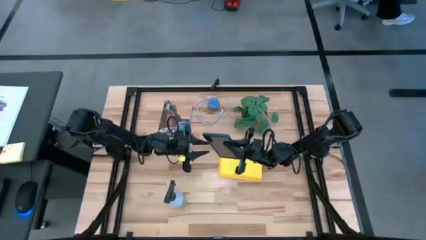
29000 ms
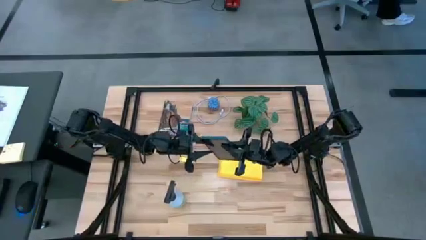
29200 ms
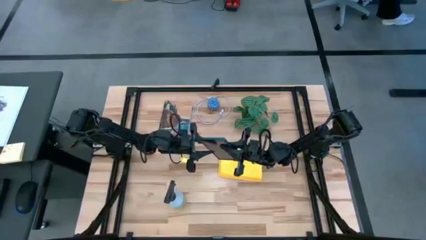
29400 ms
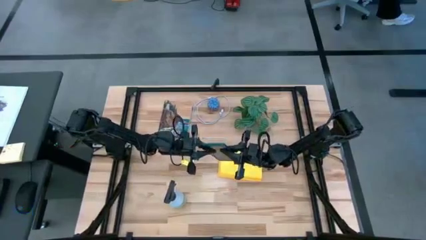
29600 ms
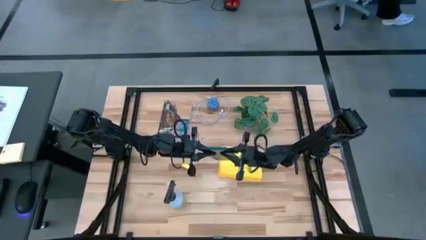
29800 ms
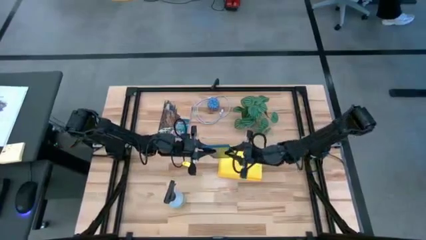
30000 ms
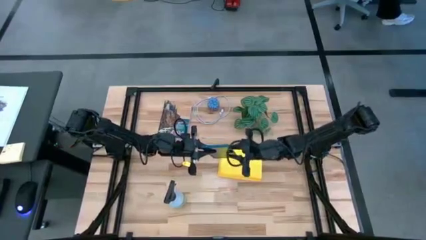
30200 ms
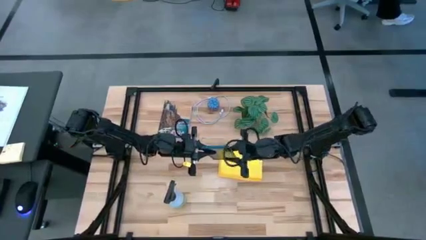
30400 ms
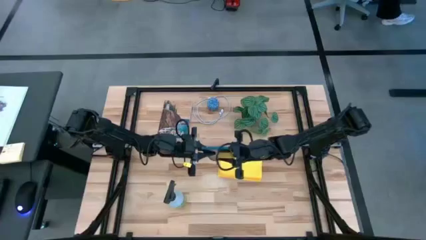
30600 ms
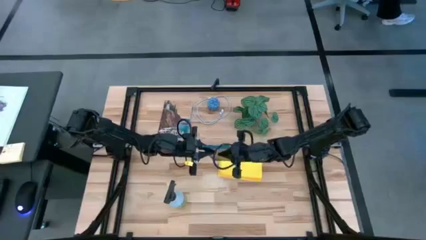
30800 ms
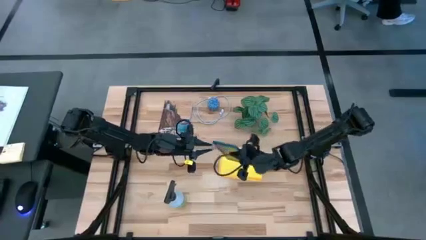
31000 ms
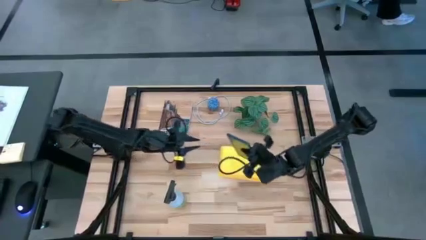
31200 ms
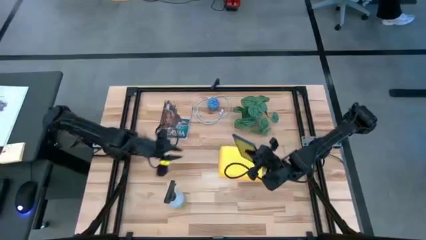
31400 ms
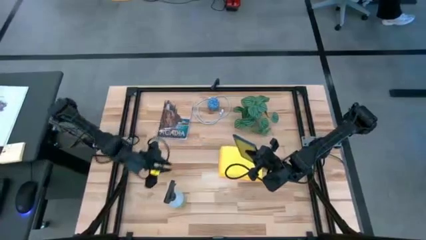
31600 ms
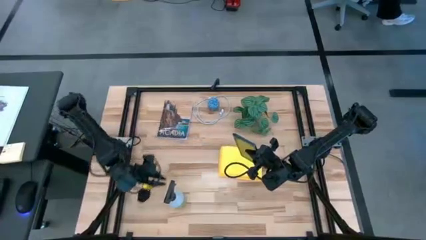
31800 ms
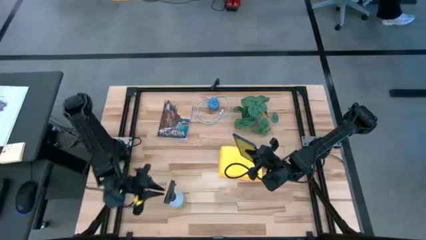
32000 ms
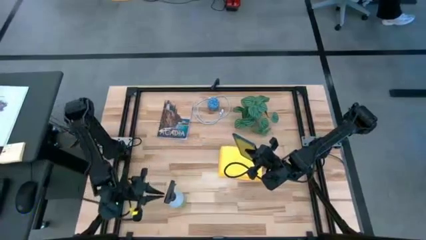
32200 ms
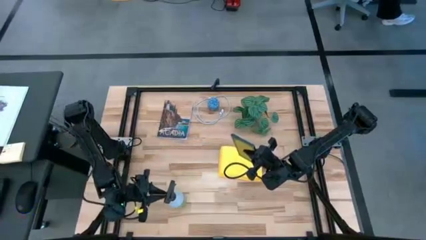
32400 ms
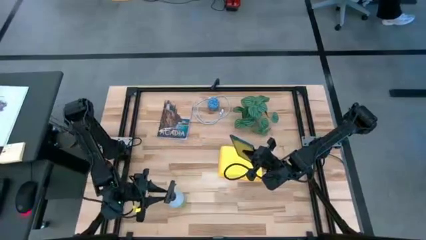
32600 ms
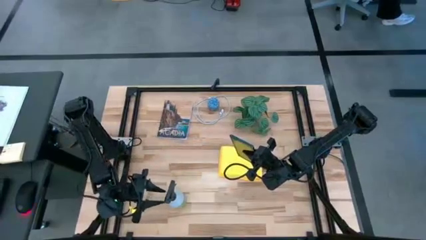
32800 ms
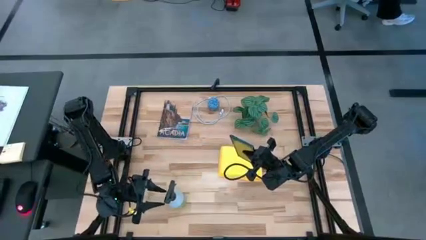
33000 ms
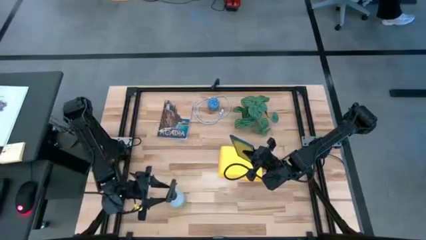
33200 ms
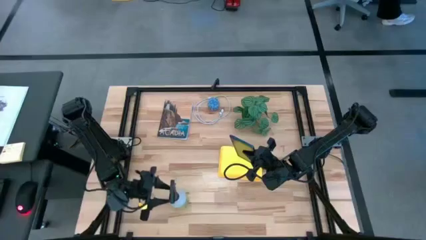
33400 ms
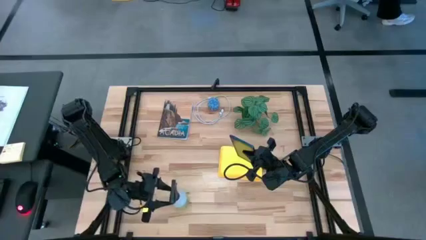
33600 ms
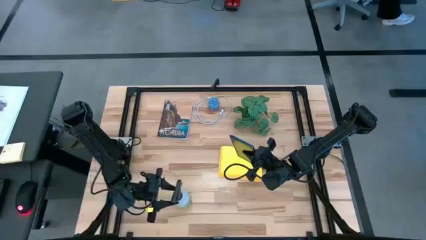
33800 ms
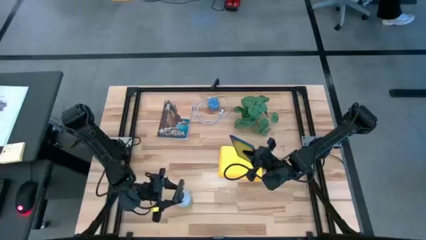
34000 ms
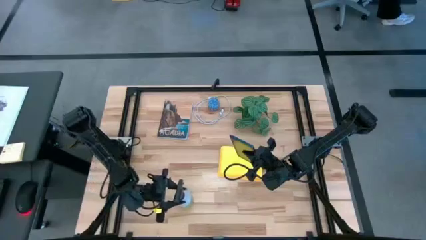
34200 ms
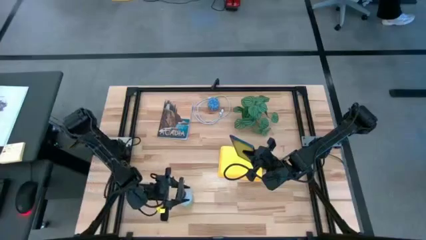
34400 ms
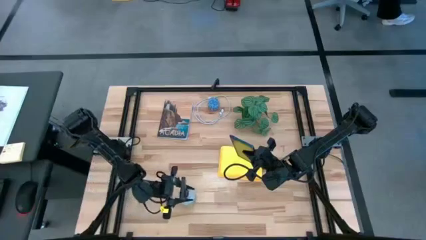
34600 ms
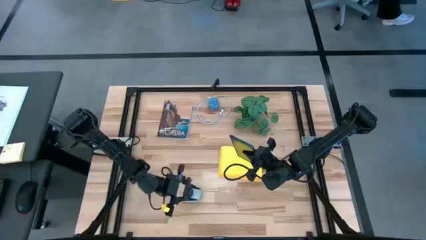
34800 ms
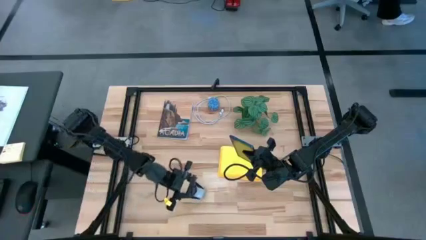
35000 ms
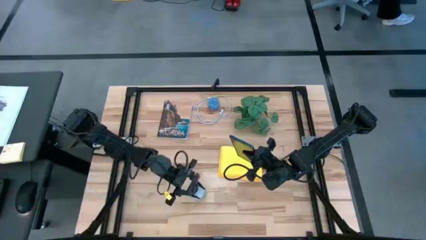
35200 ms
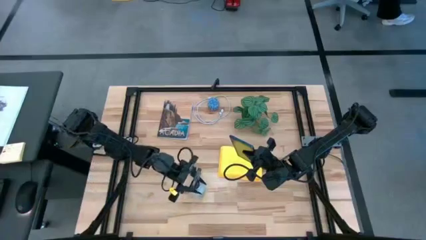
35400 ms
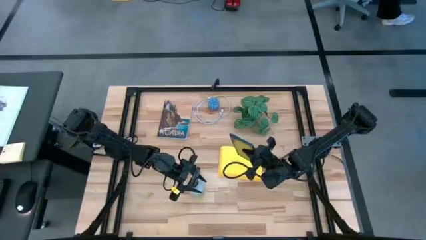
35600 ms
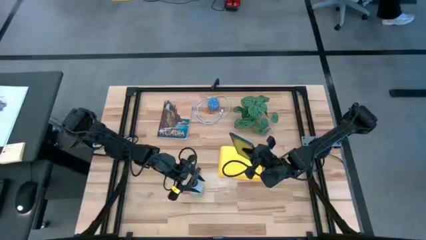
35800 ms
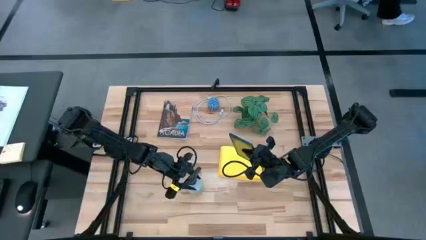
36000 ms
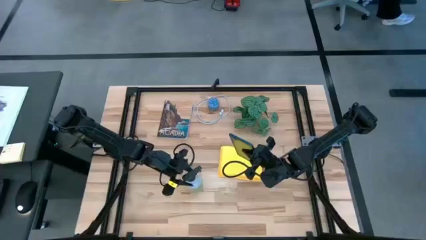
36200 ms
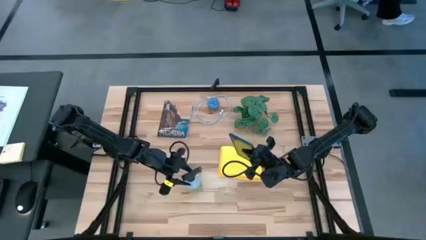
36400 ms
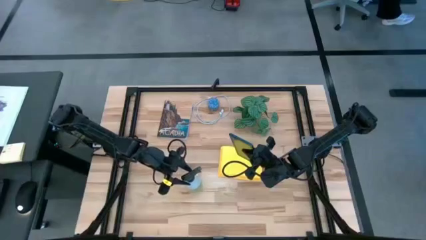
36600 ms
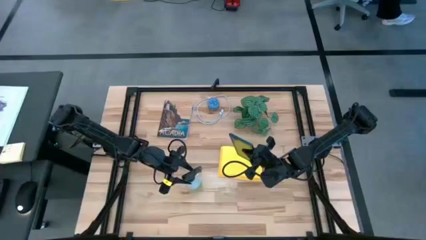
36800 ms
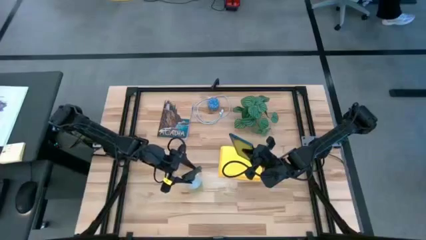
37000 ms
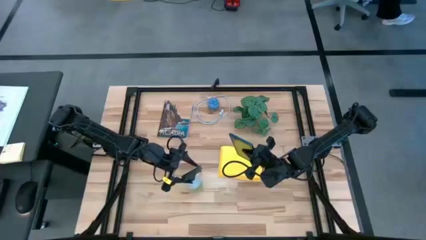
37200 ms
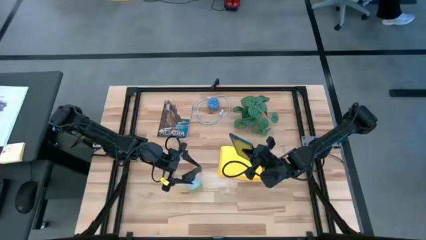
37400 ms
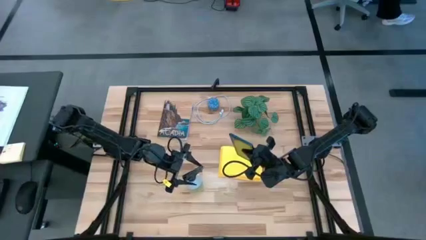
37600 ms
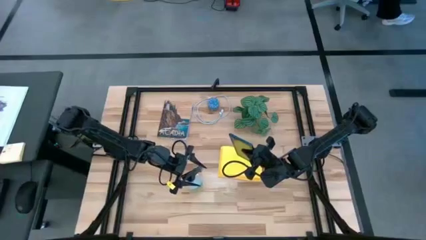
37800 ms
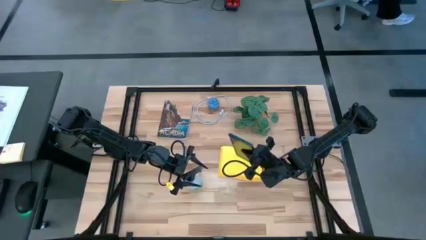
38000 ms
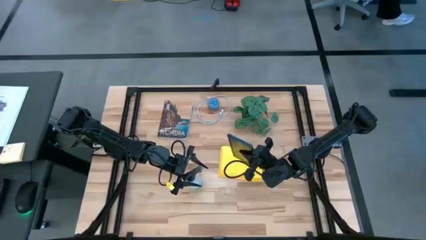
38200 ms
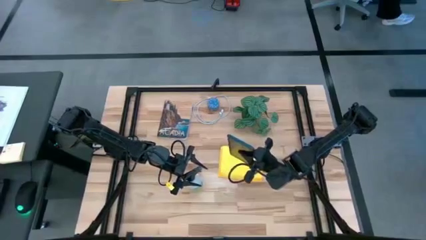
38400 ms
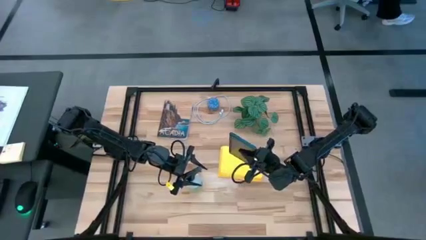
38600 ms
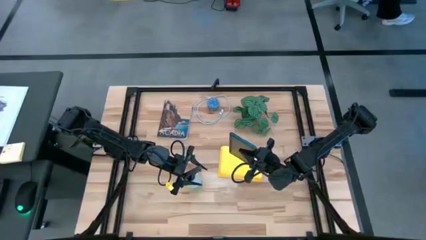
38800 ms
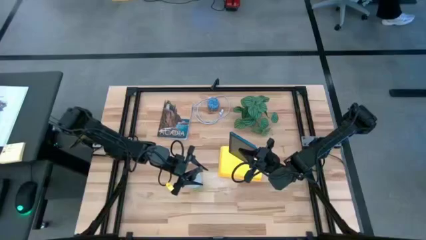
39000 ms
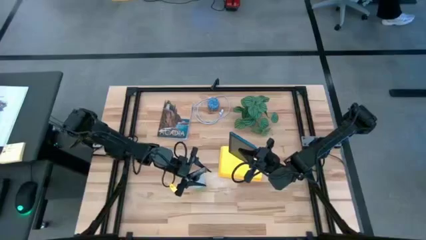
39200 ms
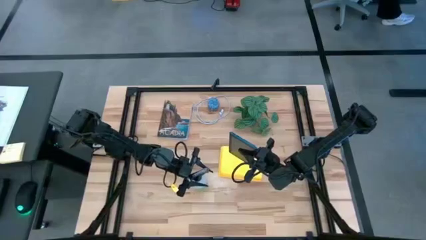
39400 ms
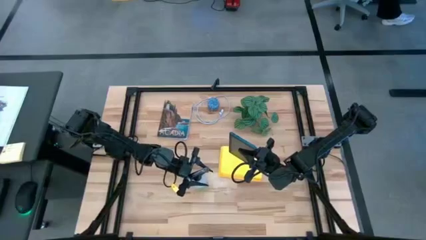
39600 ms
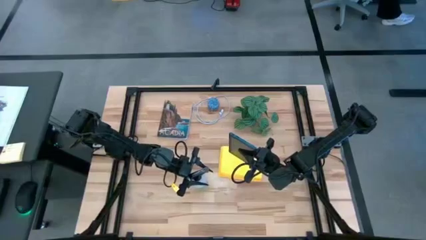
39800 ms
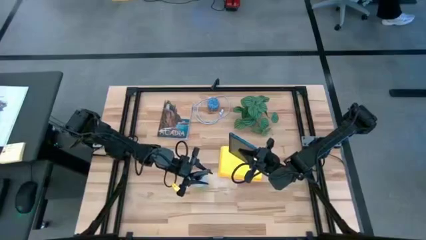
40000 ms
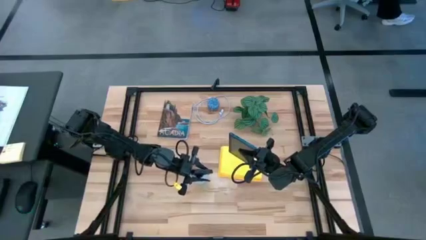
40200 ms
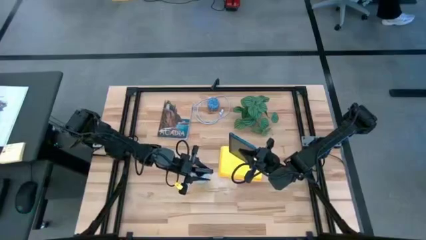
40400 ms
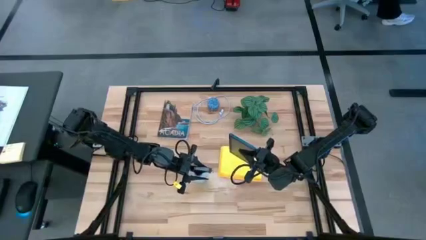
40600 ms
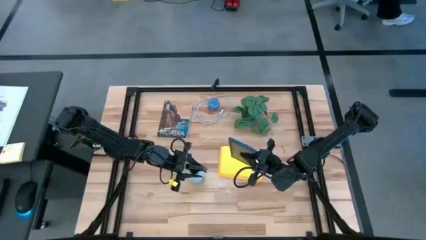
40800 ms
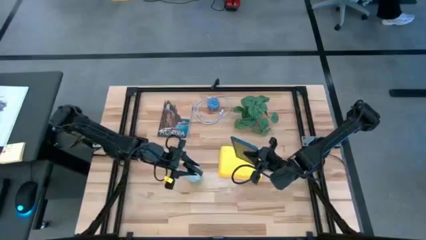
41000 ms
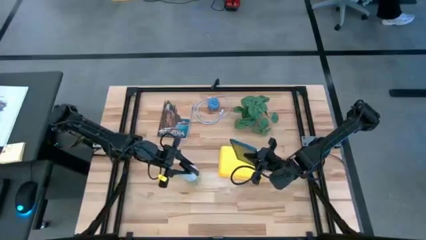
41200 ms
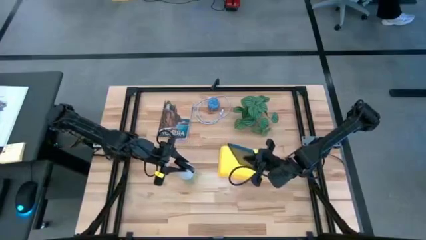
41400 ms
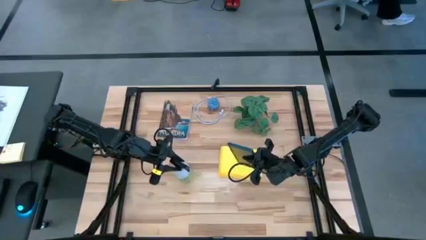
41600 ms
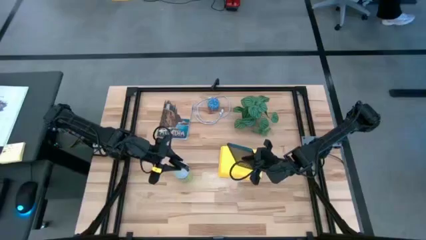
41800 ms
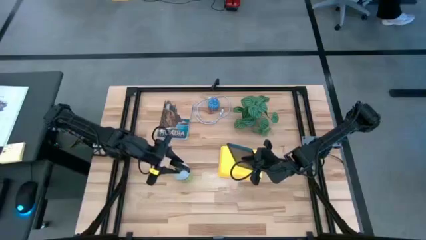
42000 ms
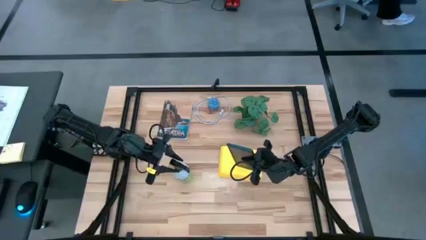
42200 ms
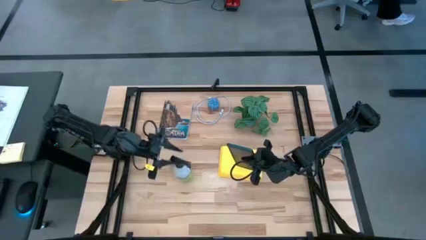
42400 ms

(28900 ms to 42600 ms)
Task: Apply microfiber cloth
Spray the front of the blue tablet
